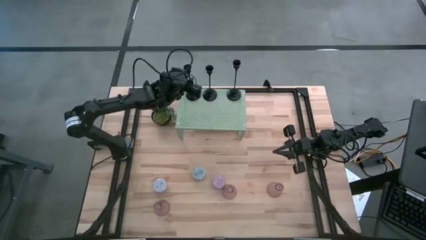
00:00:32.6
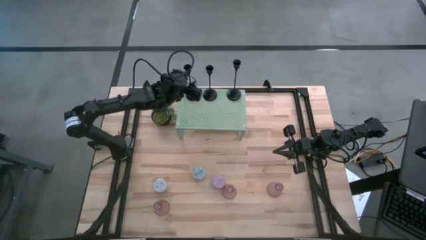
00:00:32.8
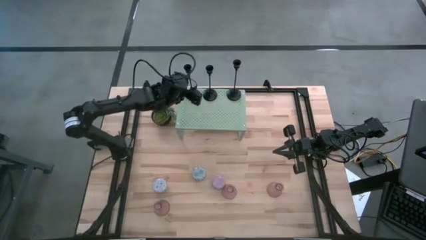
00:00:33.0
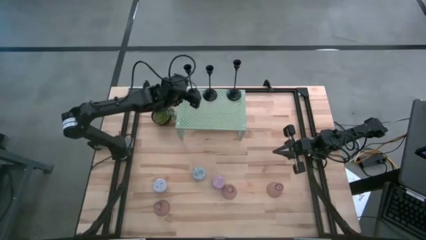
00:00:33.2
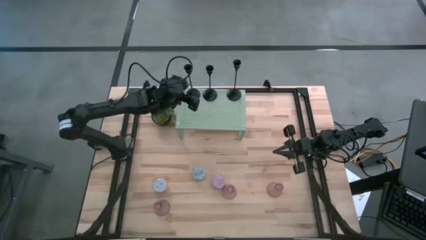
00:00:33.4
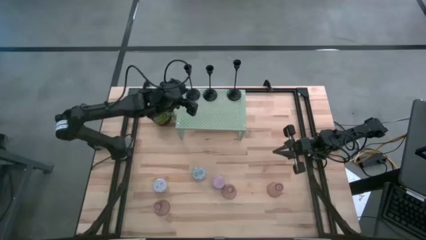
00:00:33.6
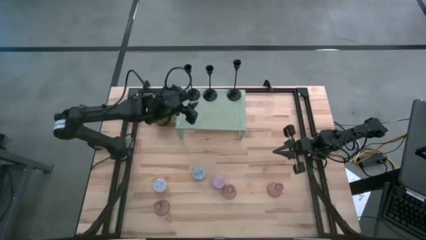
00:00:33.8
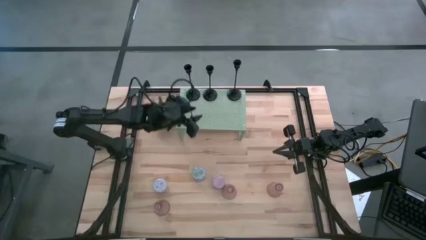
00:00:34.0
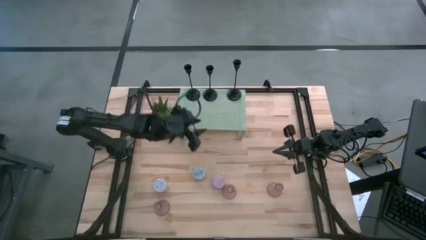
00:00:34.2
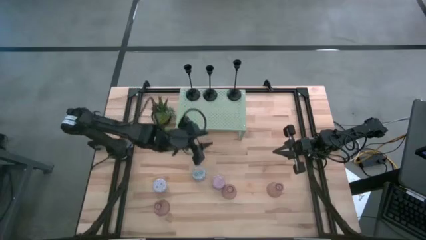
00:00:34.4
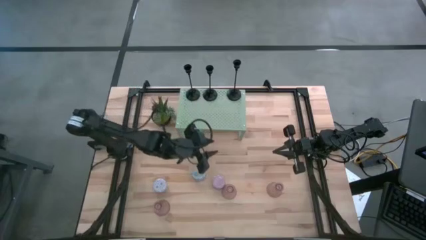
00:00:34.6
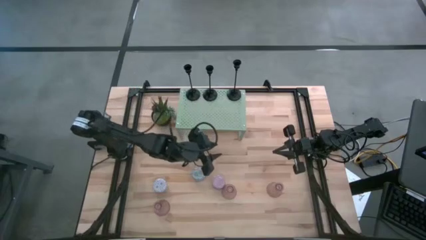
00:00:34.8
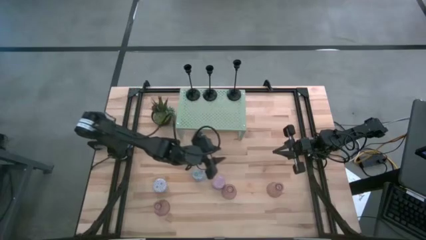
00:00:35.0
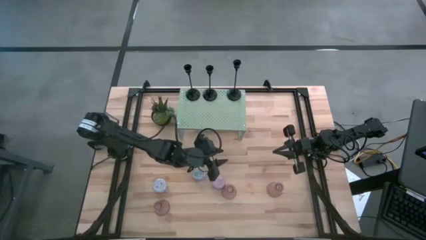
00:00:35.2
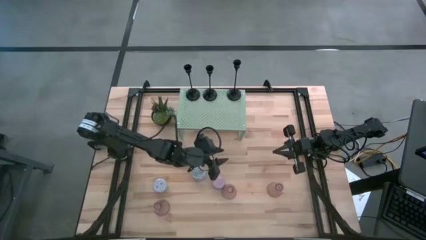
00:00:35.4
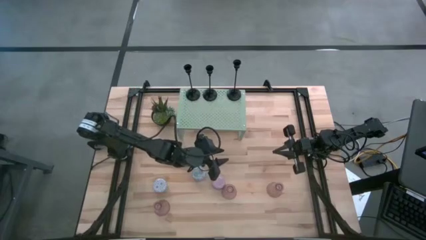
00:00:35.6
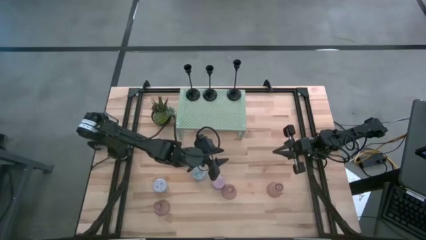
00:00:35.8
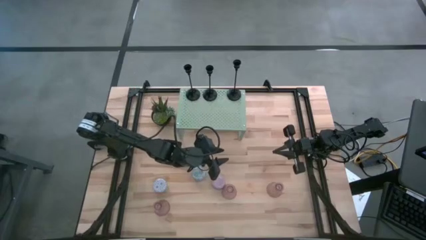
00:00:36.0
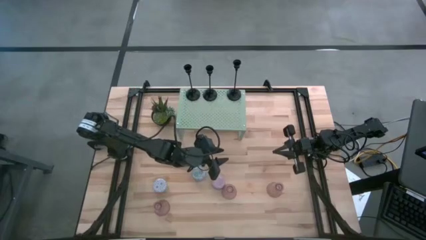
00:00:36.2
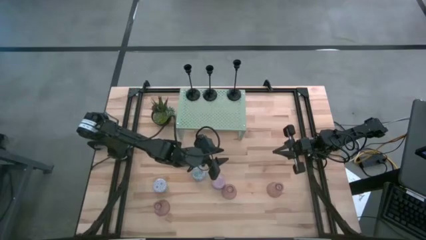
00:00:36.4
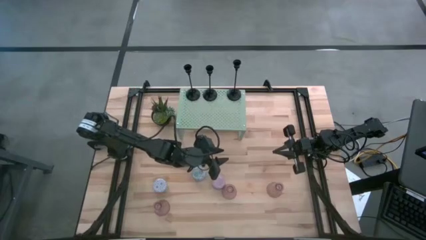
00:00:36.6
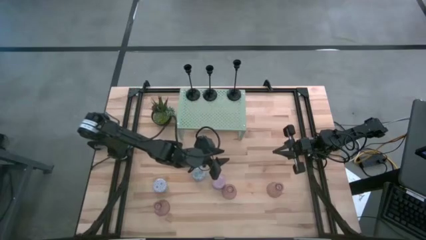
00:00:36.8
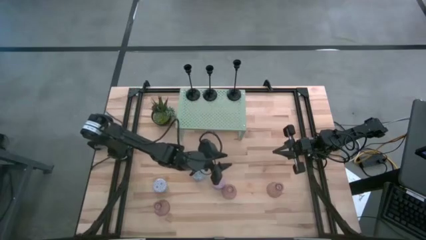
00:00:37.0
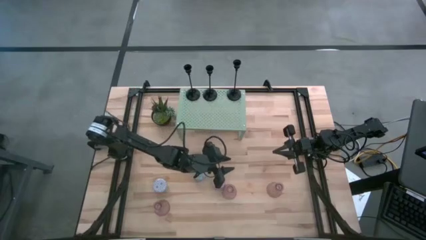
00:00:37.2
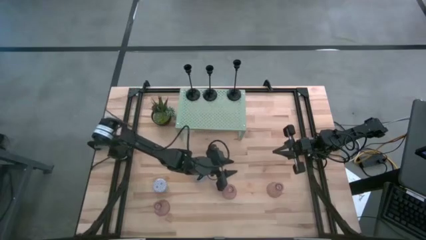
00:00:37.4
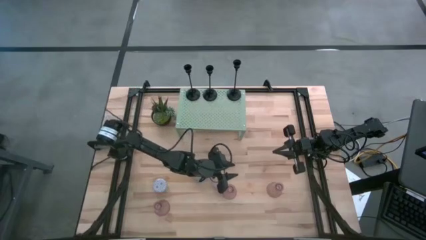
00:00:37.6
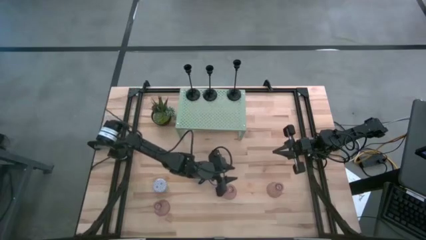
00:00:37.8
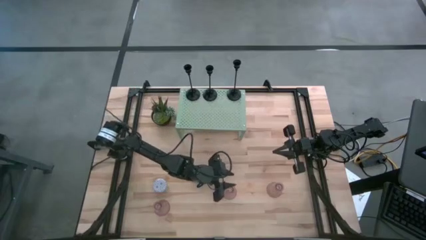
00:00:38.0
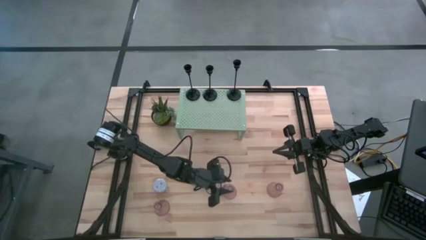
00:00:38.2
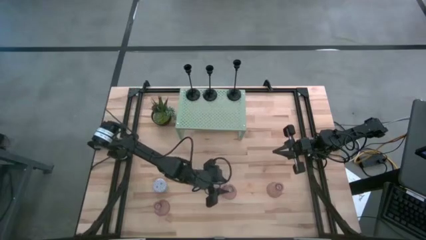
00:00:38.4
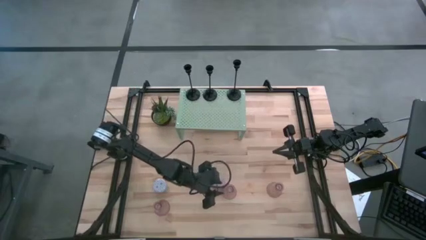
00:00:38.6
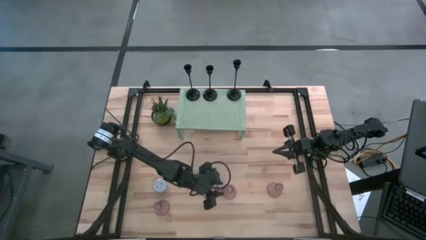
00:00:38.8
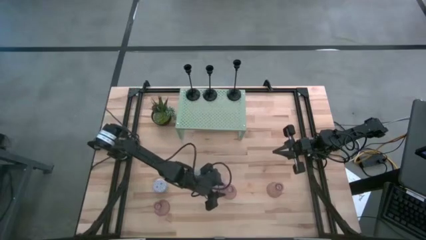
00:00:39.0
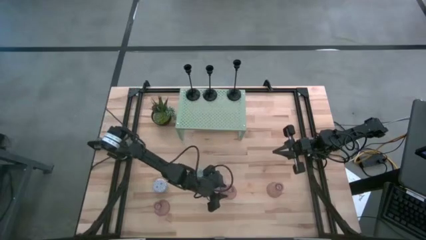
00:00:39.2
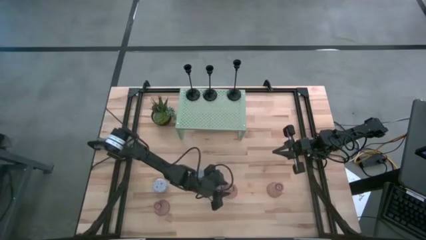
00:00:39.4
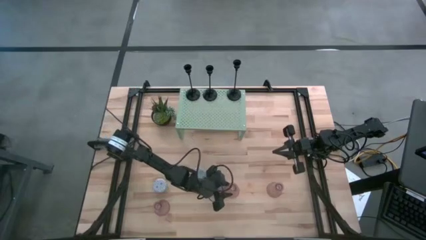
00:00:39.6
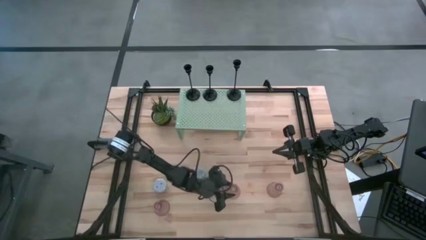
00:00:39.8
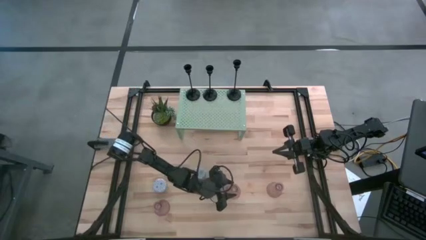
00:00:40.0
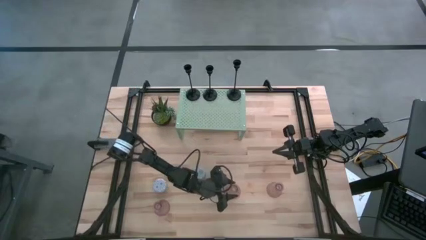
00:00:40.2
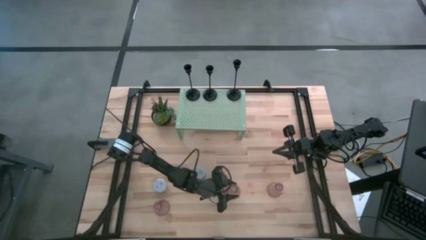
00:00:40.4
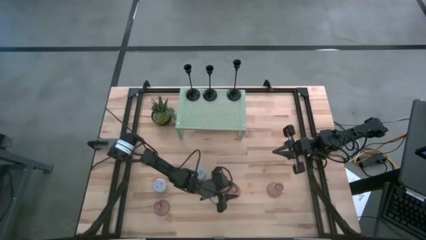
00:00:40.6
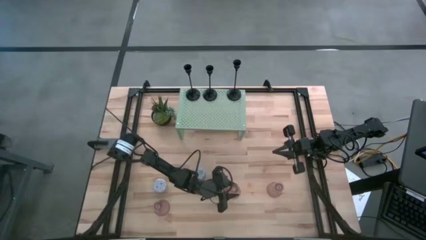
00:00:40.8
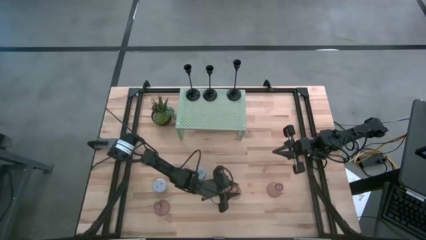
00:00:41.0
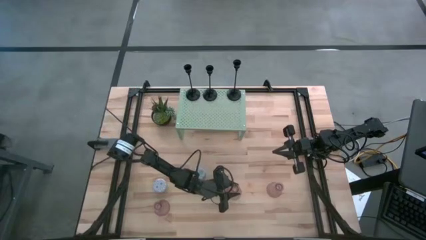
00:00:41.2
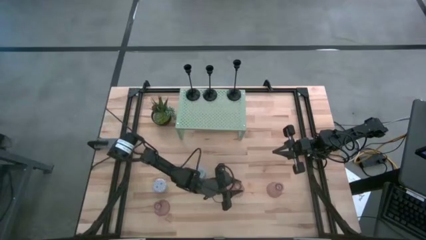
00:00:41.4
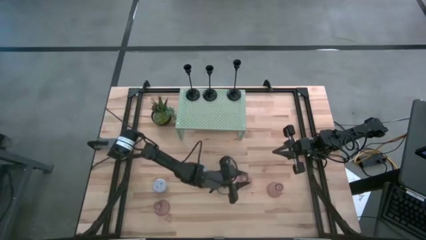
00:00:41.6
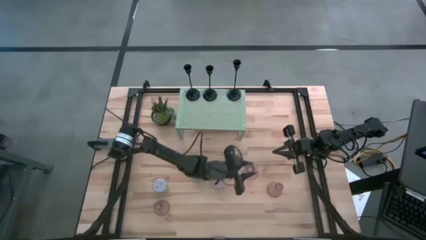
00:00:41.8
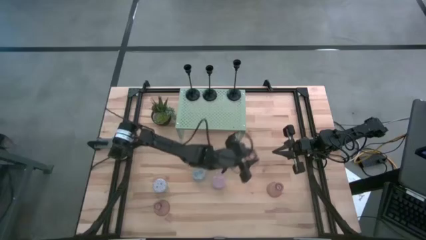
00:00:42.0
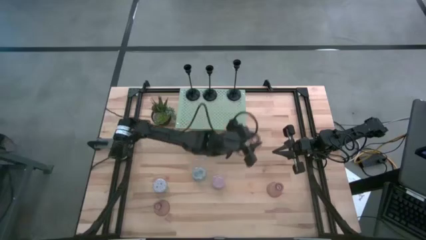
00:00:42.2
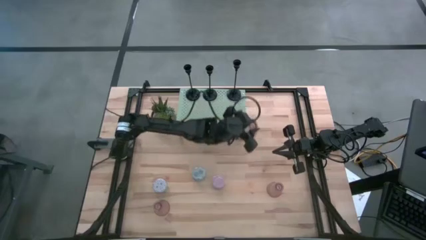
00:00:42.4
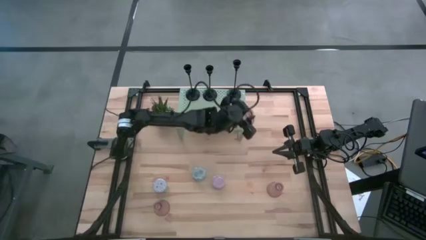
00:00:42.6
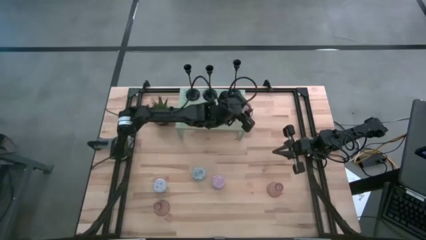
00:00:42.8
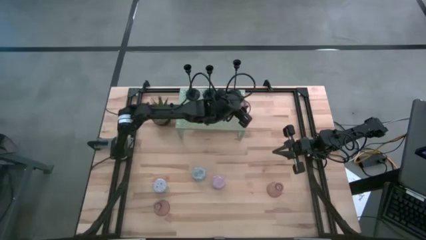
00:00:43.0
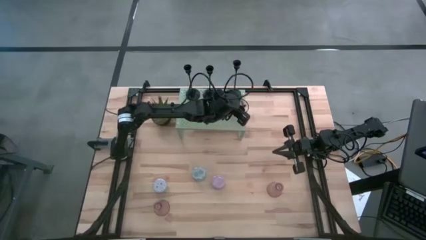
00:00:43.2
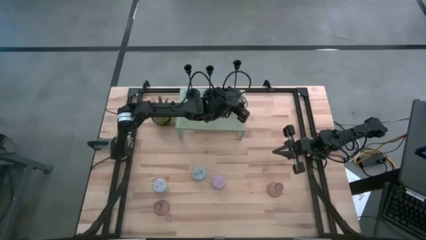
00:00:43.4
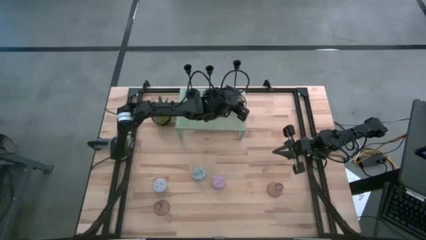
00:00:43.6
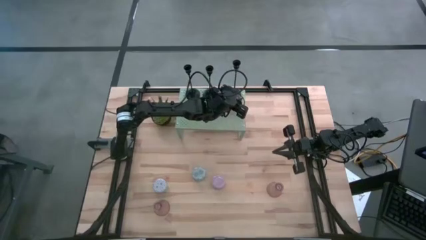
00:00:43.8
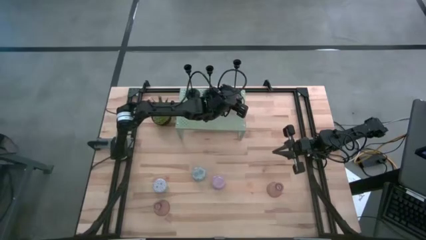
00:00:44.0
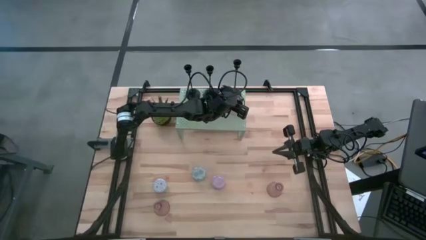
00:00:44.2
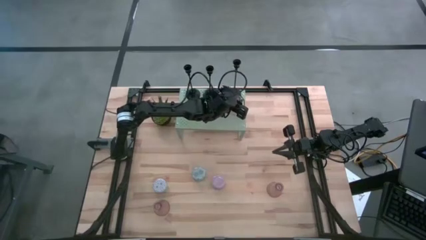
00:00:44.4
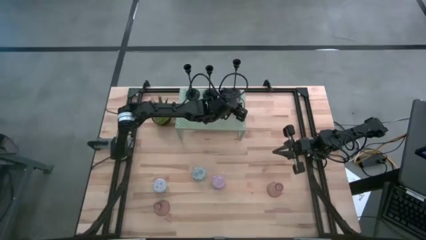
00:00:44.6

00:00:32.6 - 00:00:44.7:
Task: Pick & Place candle stick holders
Put the middle transparent pink candle holder on the shelf aligned with the black candle holder

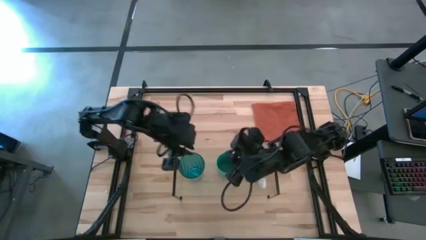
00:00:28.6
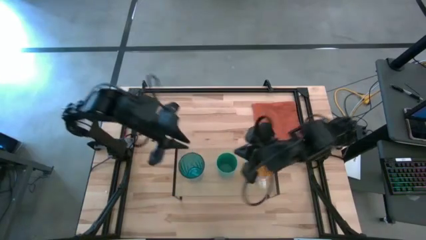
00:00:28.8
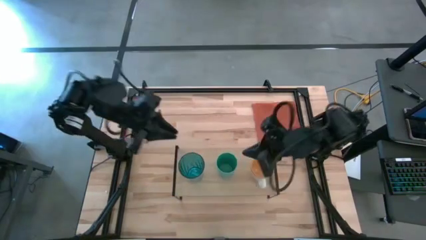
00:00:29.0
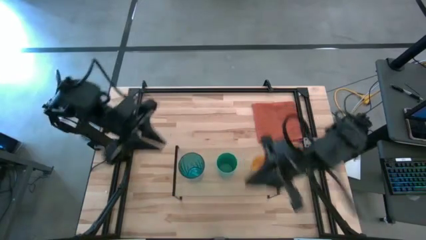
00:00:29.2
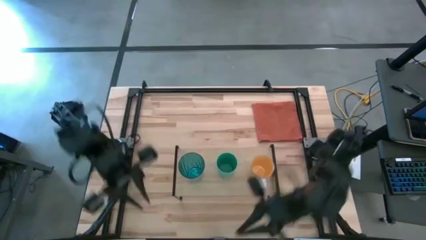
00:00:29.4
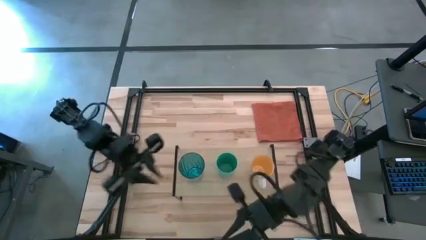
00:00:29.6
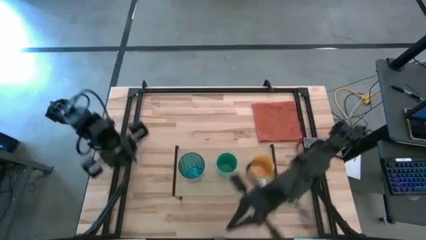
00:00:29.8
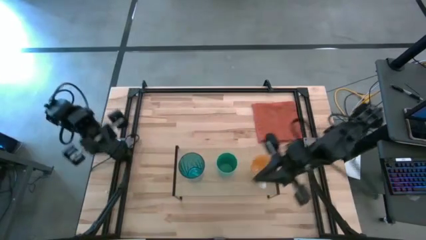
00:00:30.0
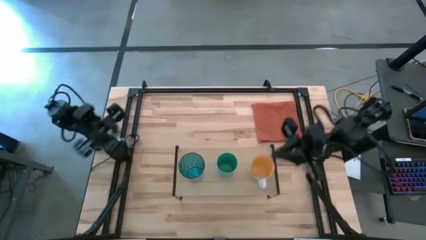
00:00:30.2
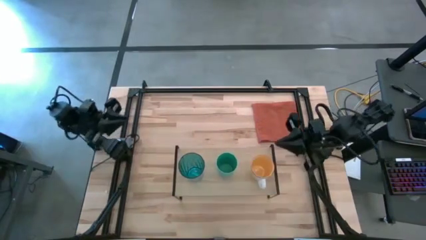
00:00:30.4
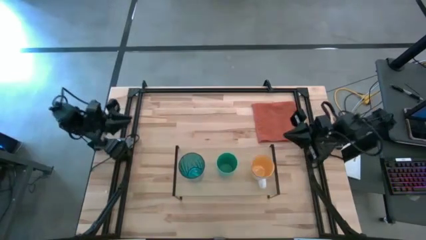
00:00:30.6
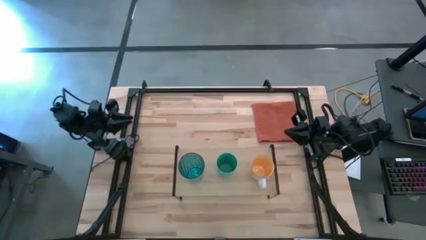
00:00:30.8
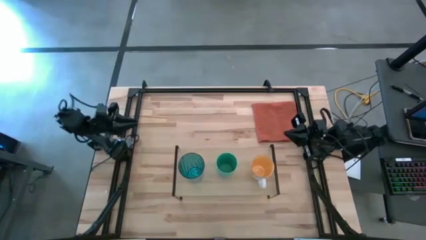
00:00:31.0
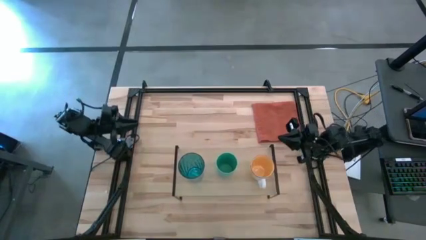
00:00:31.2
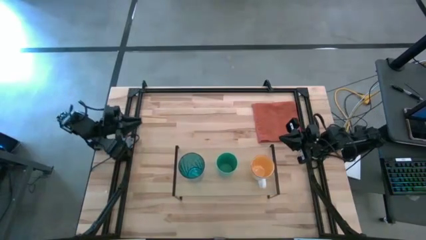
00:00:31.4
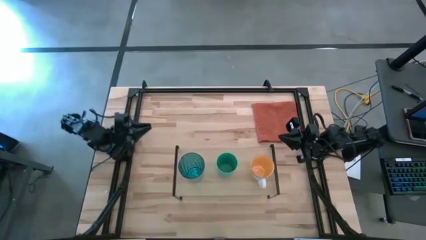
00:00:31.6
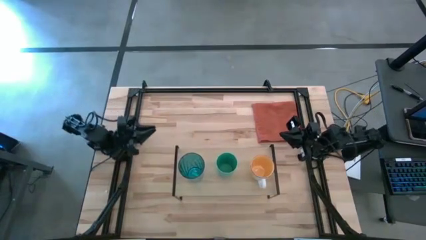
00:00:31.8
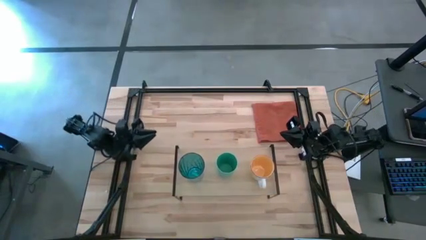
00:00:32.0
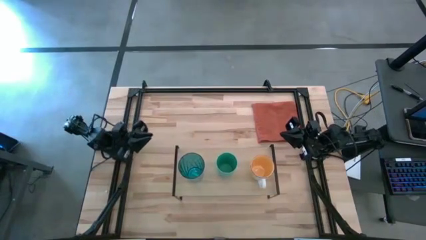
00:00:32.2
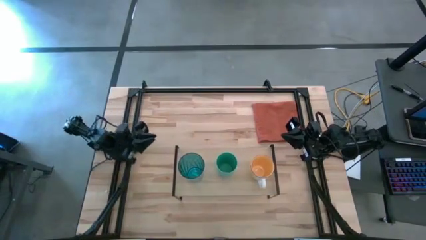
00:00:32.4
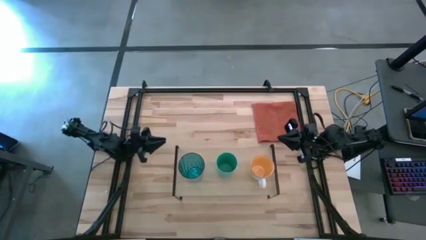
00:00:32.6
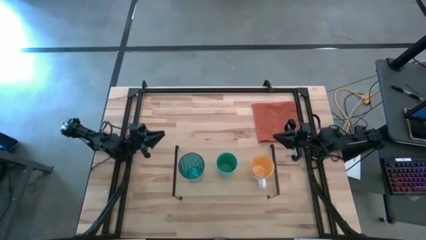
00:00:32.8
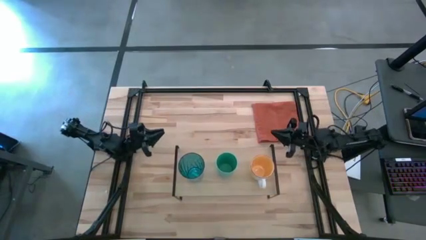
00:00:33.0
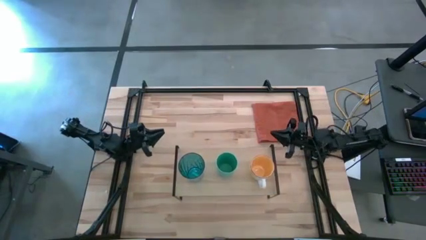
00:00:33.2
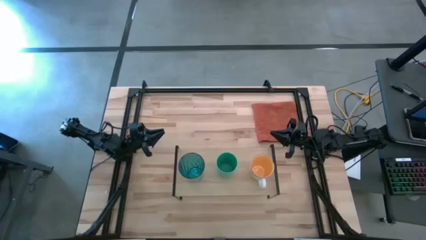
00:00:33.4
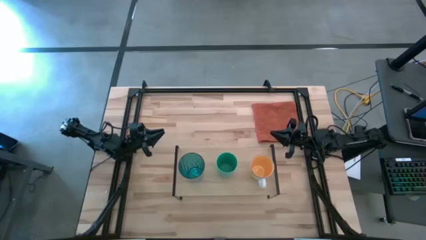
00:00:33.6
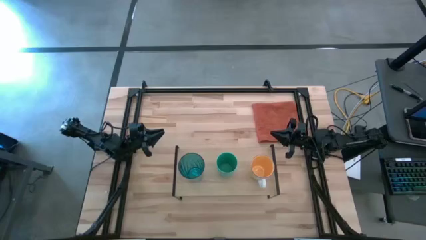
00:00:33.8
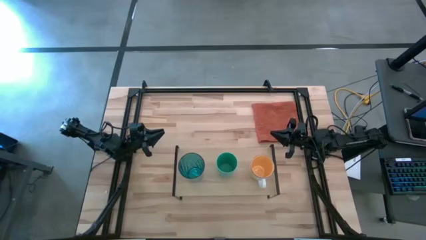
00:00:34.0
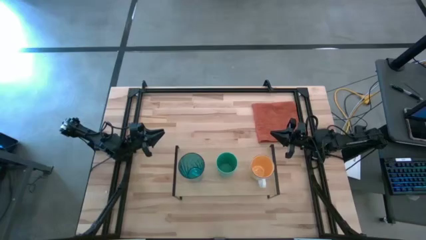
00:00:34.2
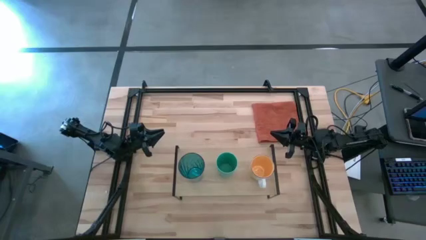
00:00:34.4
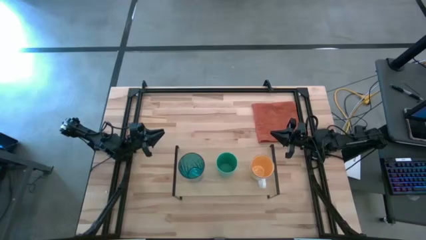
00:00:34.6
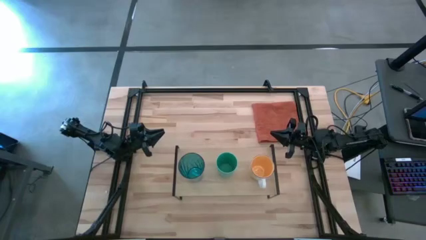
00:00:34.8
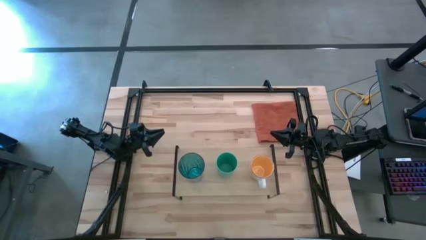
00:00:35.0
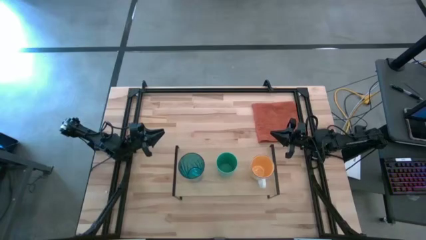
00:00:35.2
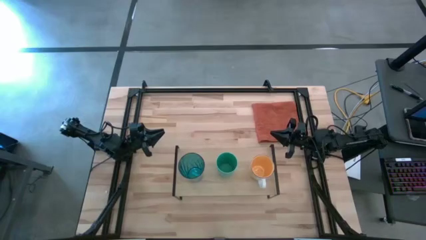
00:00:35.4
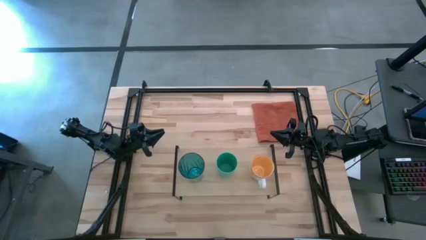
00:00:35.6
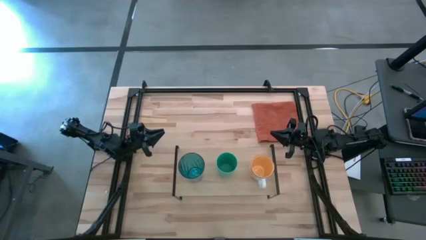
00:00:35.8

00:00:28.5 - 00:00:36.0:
Task: Stack small to large cups/mugs on shelf
Return to Home Position
